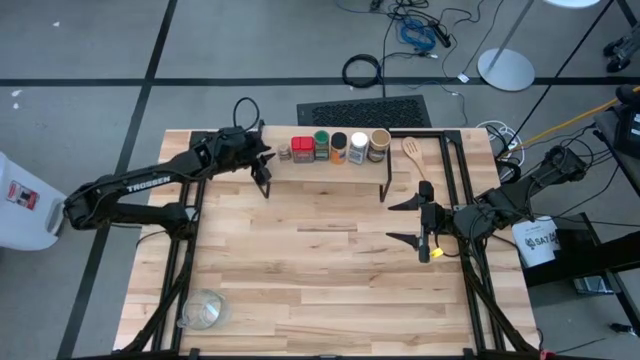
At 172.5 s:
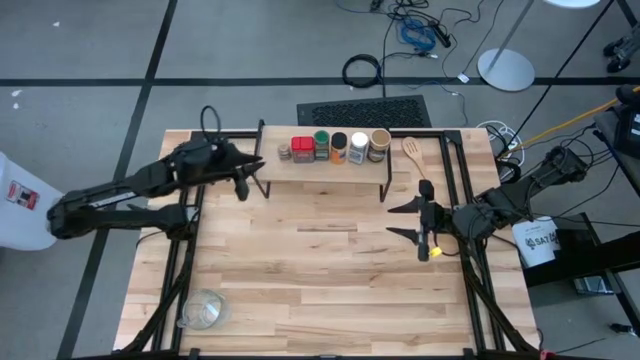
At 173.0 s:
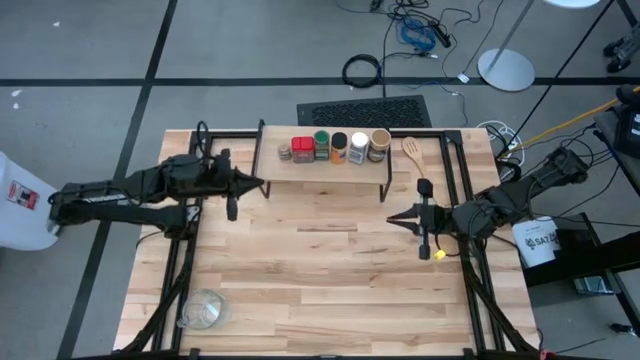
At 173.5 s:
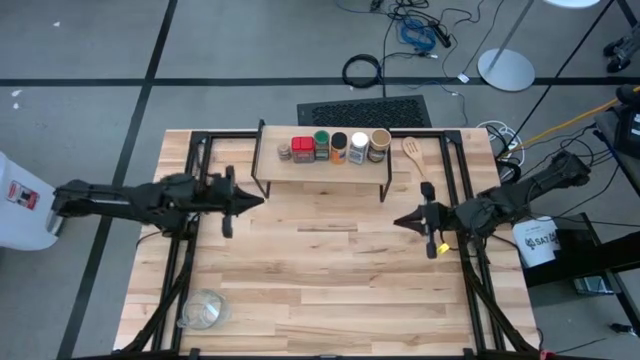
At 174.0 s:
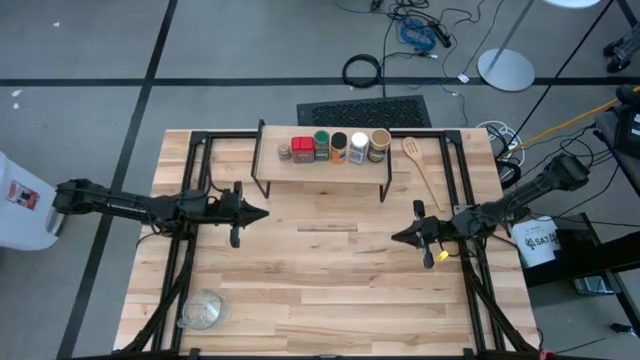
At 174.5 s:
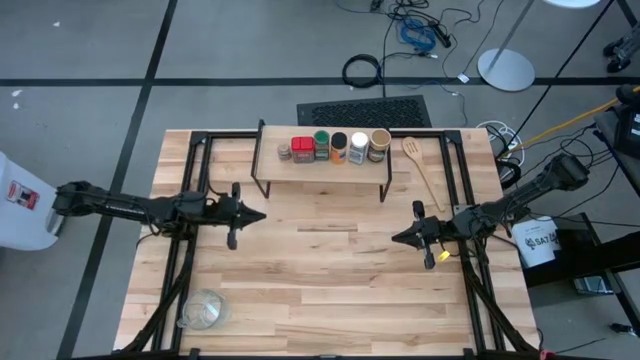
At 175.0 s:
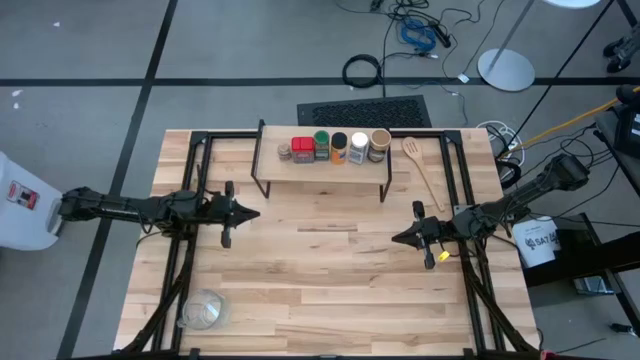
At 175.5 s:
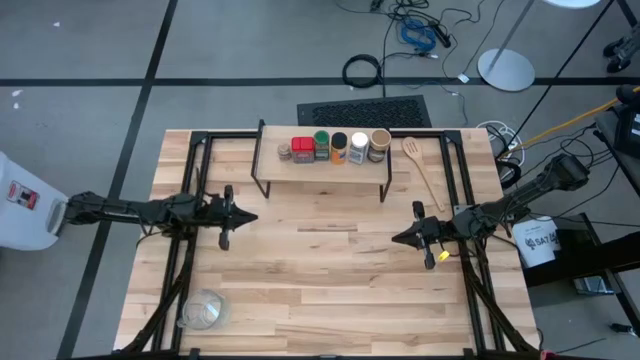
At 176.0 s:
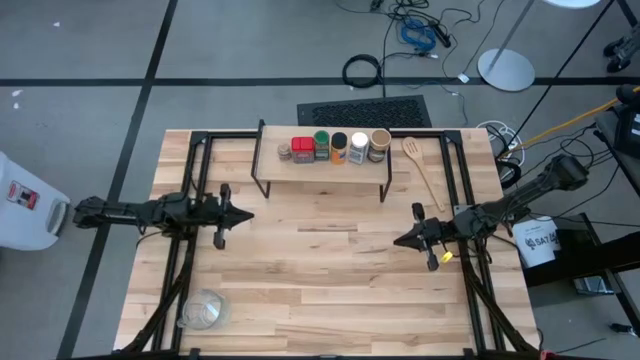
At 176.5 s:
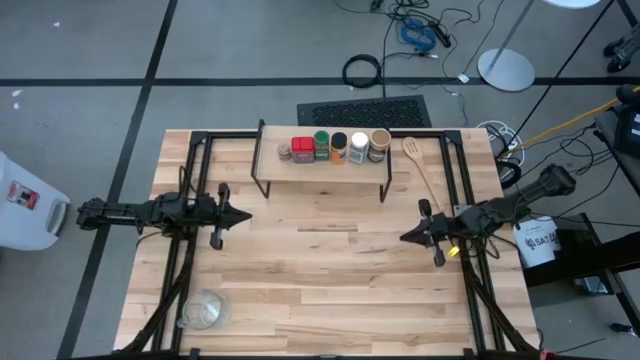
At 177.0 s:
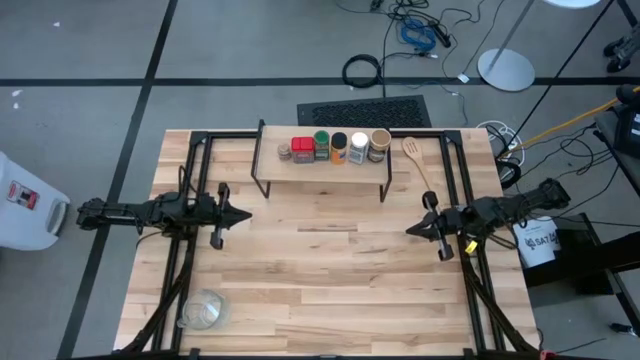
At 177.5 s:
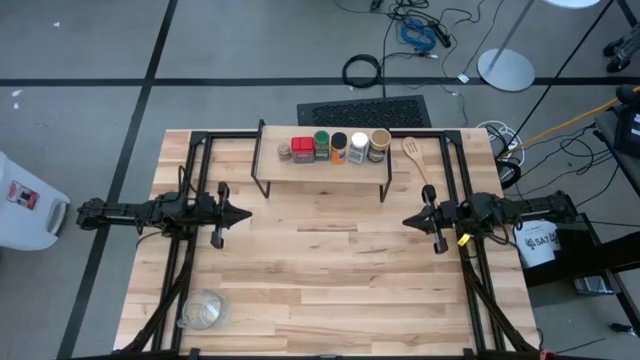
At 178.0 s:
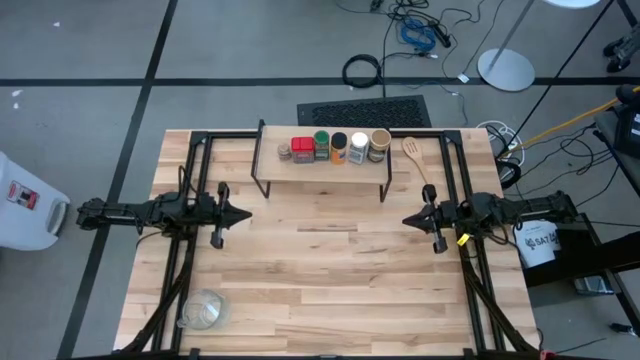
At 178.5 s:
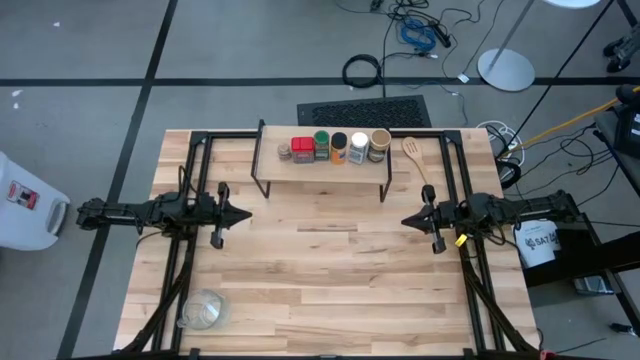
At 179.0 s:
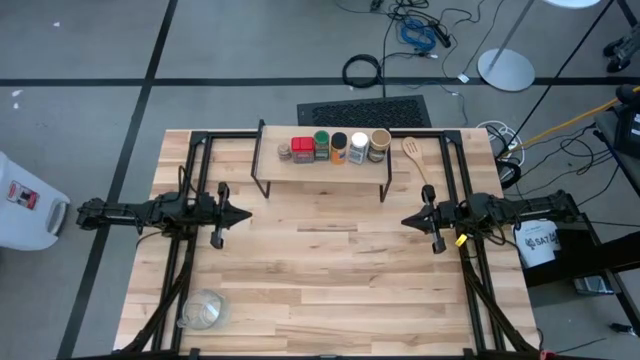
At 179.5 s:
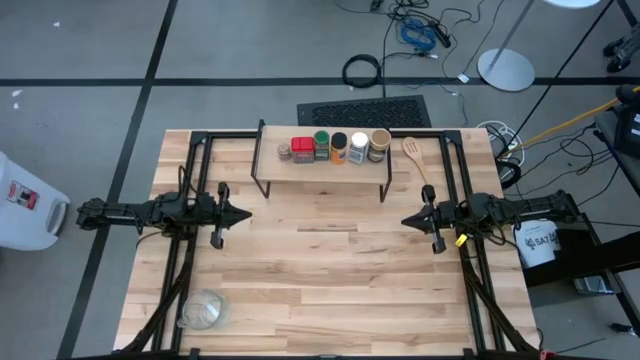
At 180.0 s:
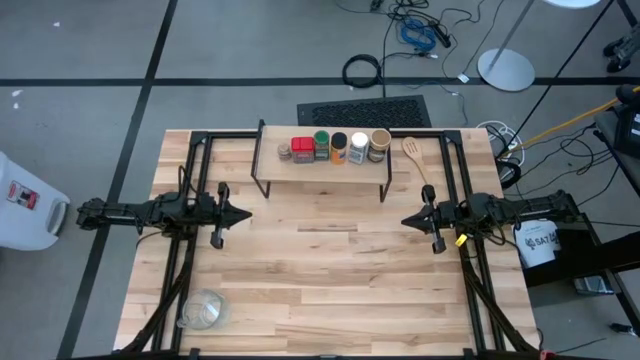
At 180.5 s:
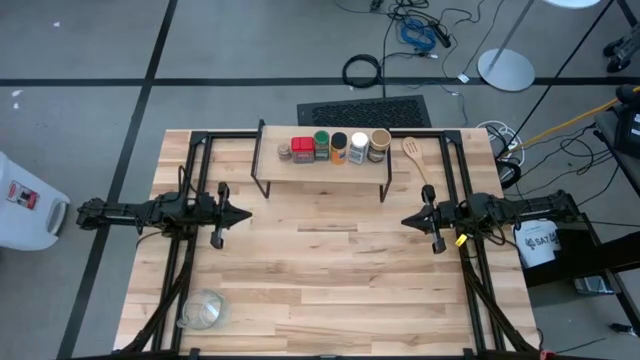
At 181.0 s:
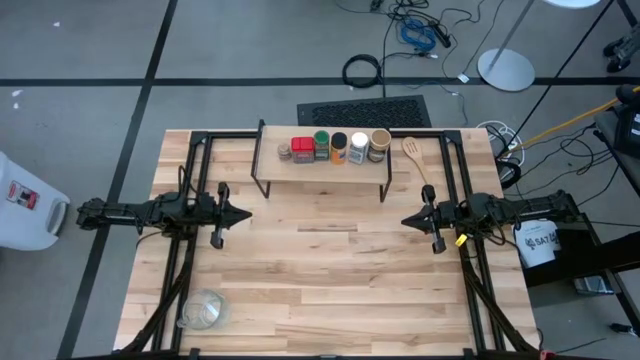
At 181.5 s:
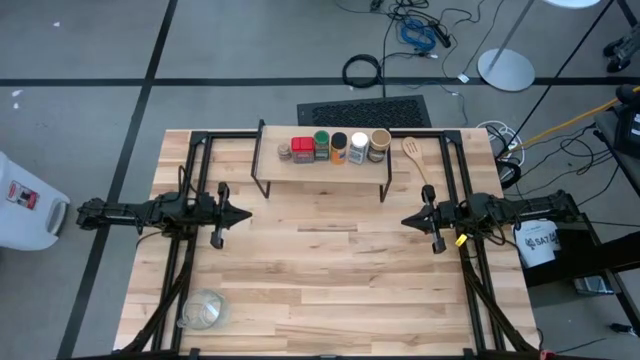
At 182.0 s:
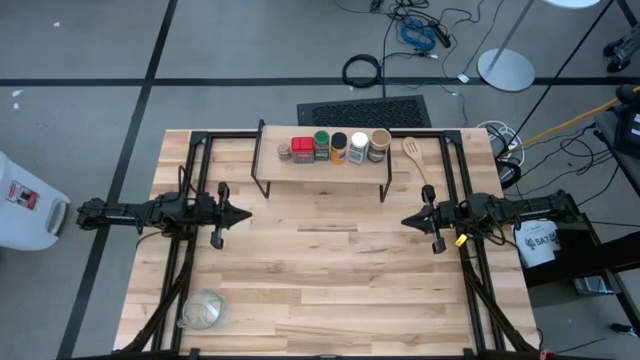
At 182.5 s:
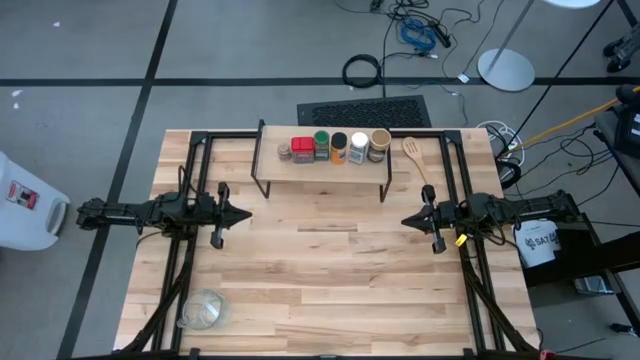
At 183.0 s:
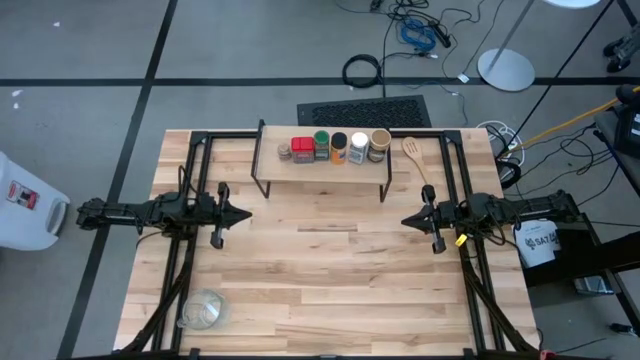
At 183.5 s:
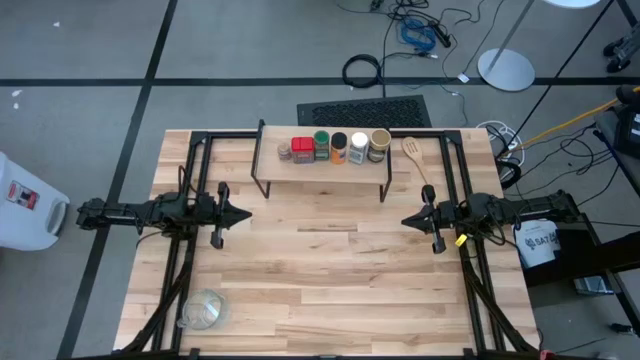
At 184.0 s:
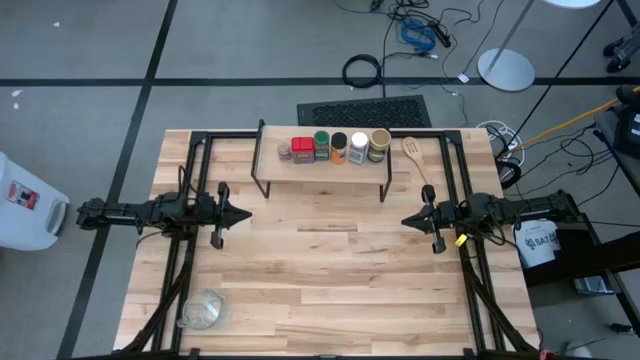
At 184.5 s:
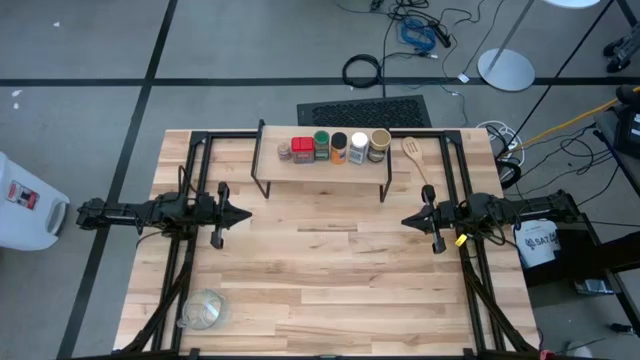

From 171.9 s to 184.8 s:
Task: Shelf spices
Return to Home Position

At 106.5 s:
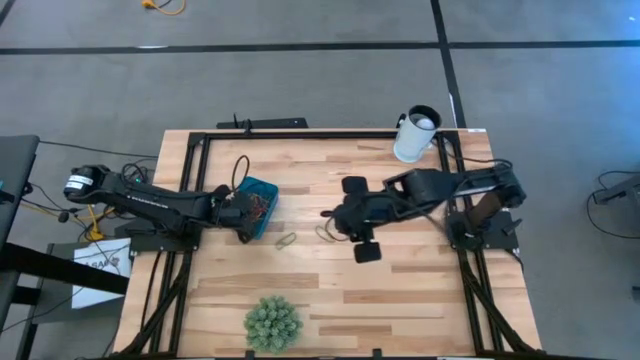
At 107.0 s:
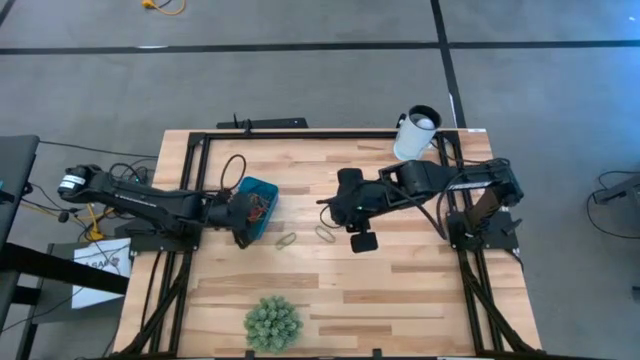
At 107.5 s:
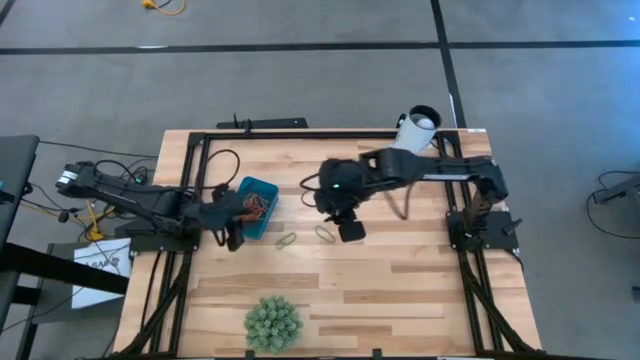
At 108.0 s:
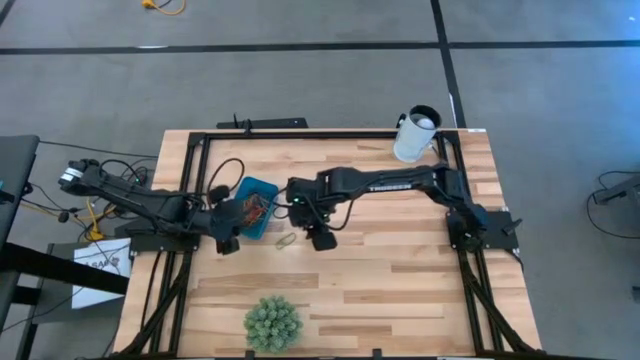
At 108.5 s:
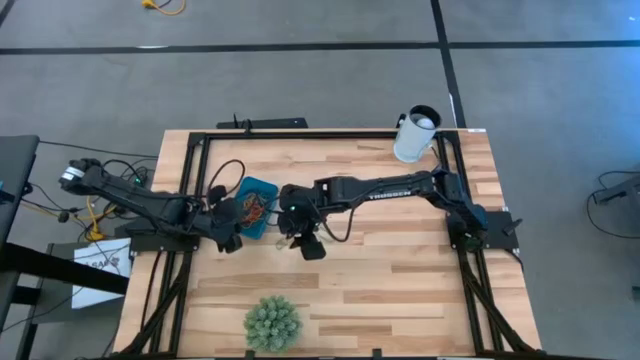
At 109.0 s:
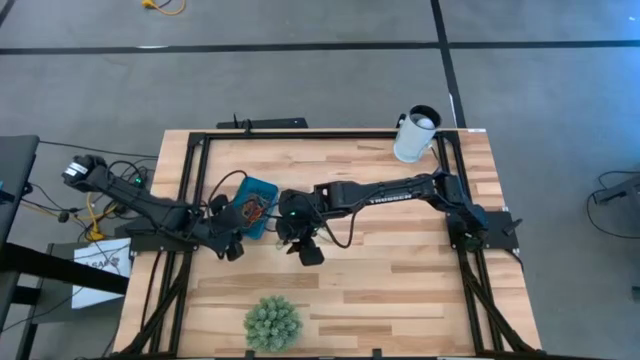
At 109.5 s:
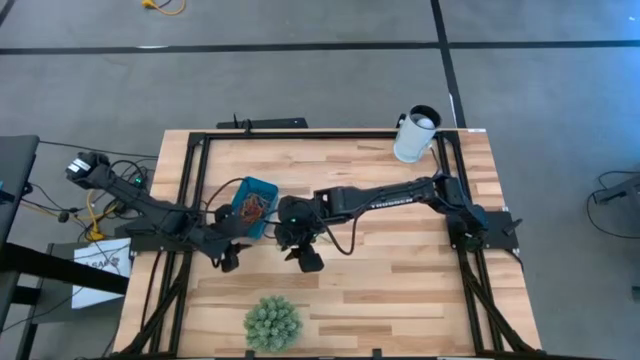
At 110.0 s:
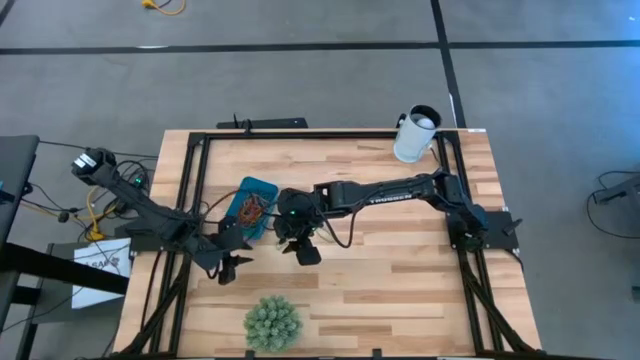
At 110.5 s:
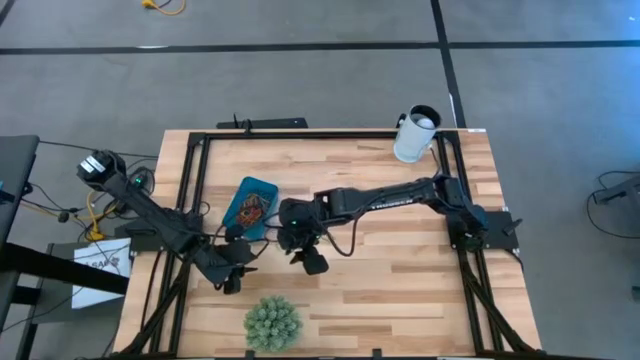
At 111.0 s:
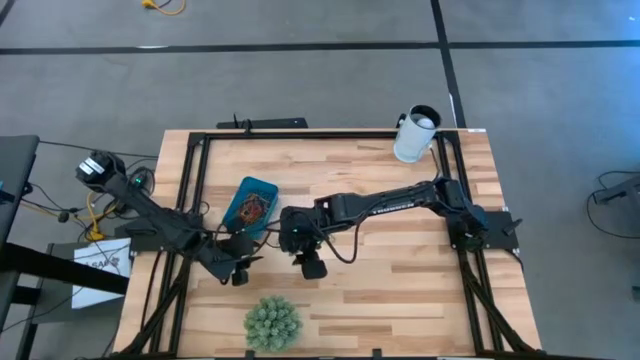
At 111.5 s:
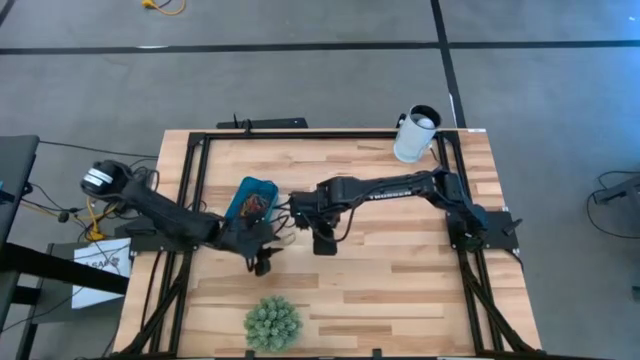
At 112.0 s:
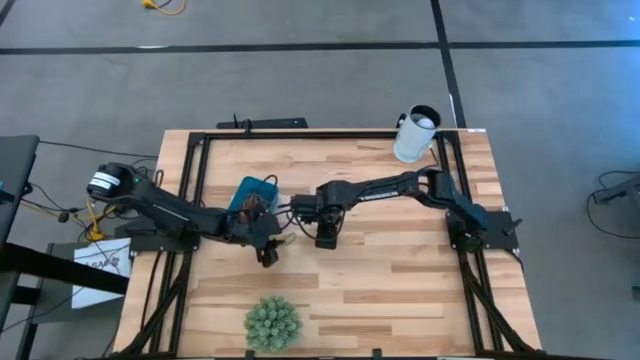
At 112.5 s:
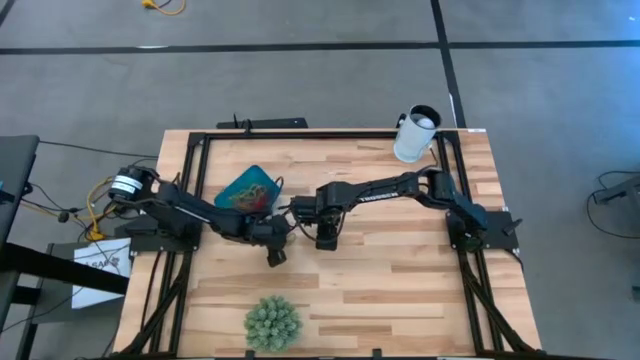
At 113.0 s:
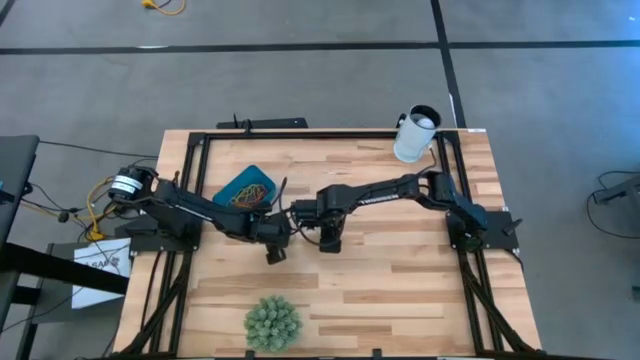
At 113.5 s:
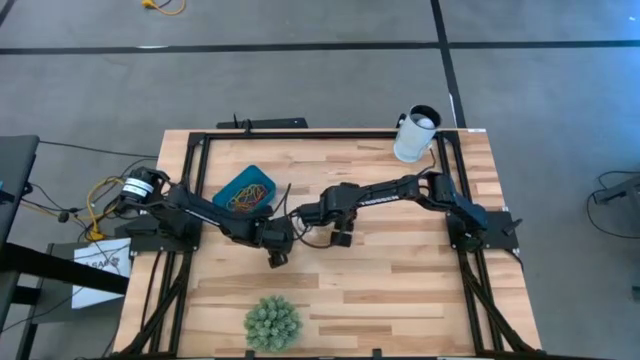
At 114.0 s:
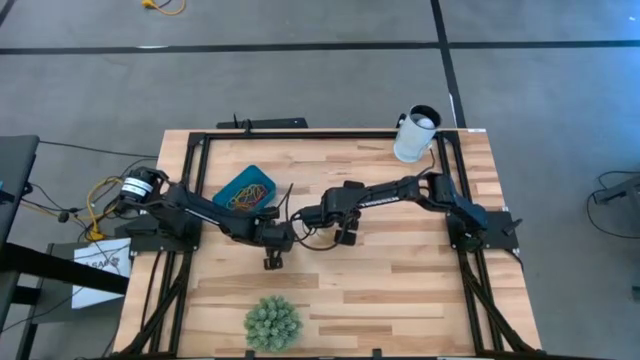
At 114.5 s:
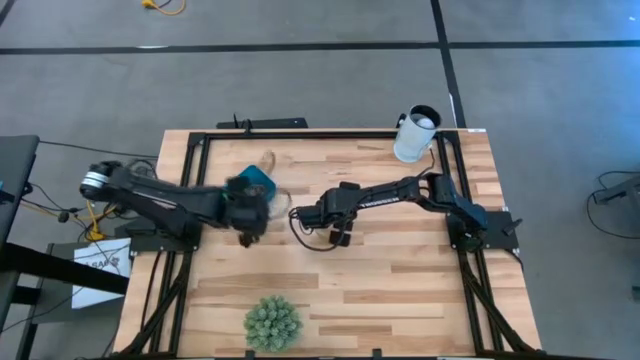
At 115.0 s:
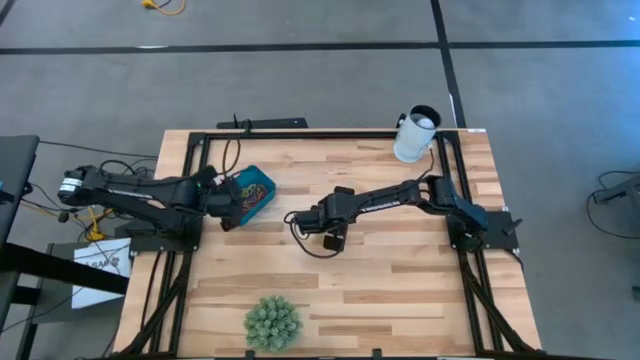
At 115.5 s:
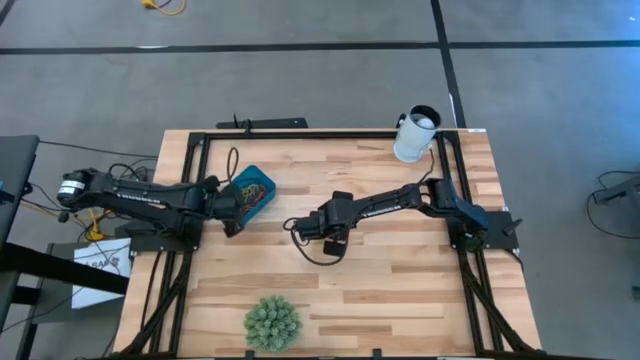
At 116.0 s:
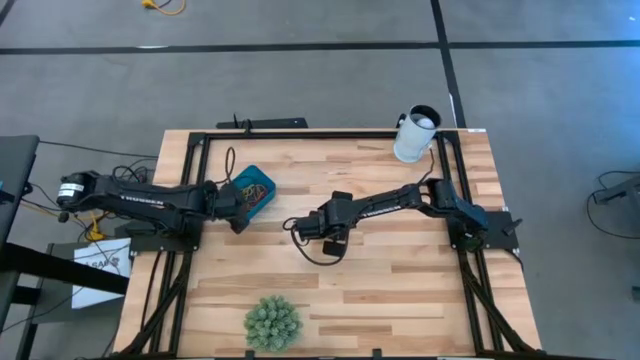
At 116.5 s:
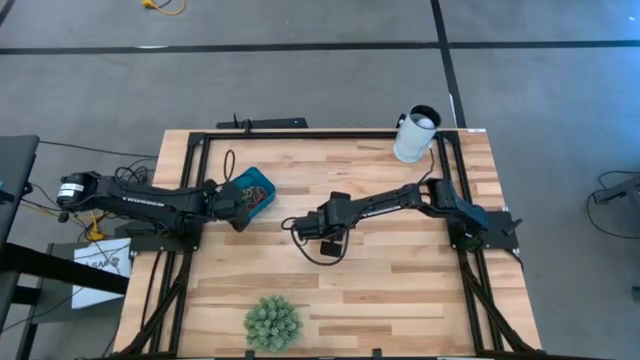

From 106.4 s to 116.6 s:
Task: Pick and place items into bin
Put the green rubber band into the blue bin
